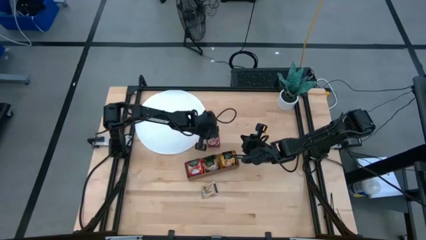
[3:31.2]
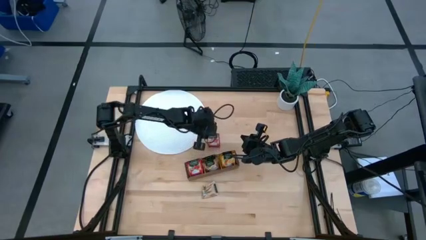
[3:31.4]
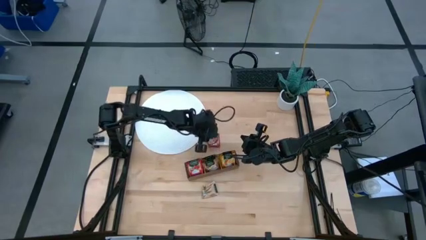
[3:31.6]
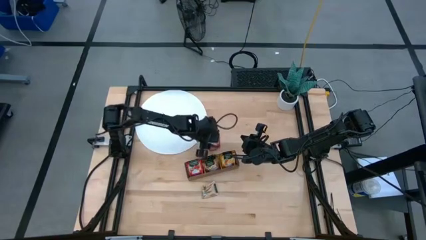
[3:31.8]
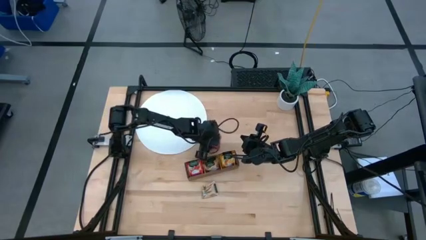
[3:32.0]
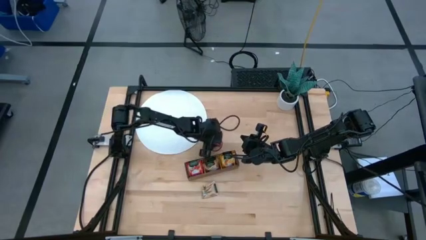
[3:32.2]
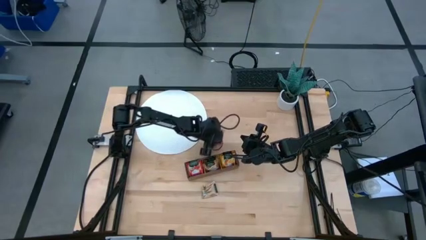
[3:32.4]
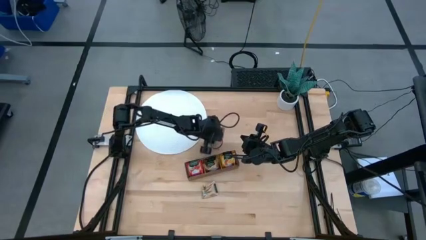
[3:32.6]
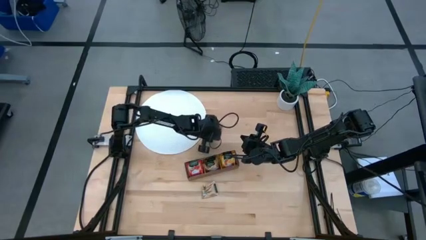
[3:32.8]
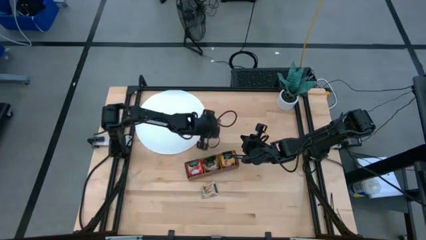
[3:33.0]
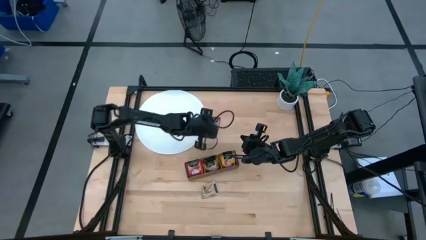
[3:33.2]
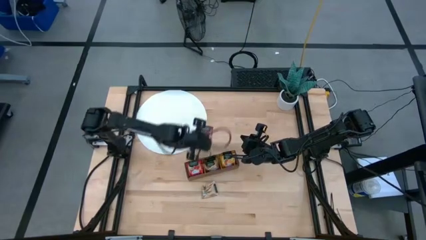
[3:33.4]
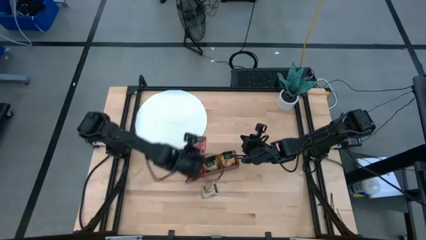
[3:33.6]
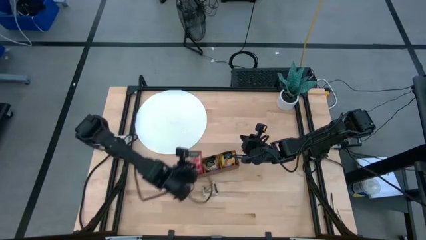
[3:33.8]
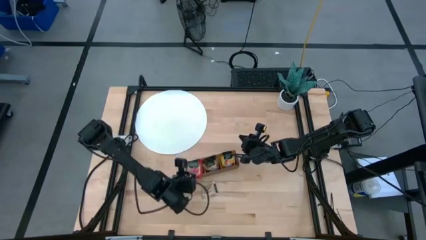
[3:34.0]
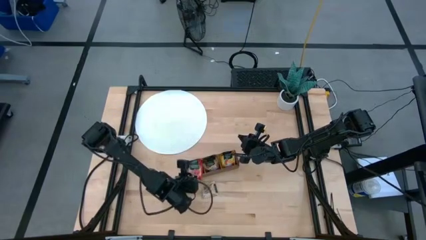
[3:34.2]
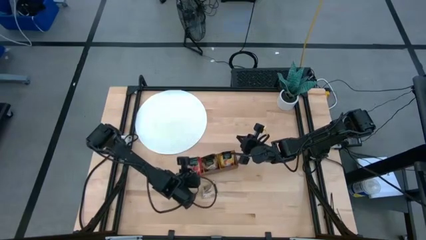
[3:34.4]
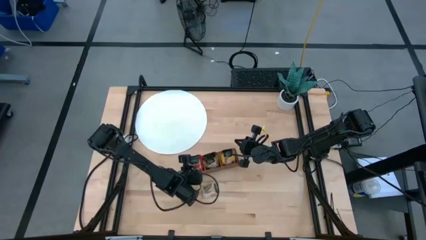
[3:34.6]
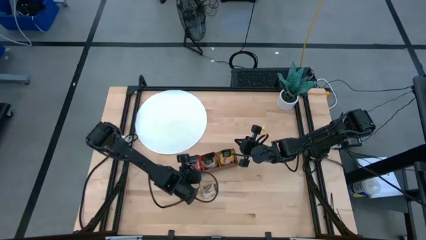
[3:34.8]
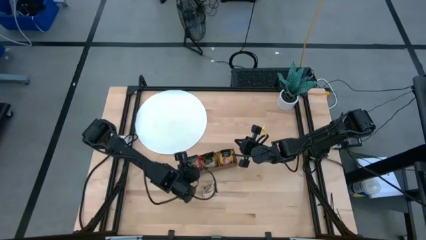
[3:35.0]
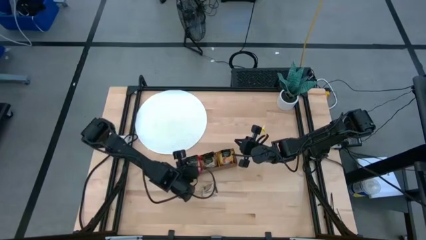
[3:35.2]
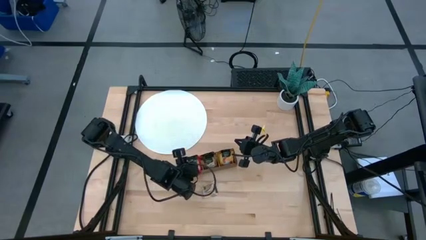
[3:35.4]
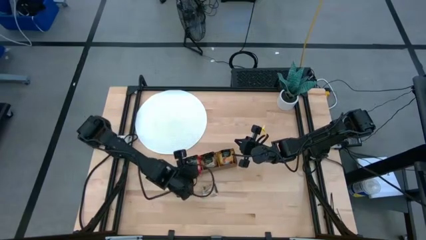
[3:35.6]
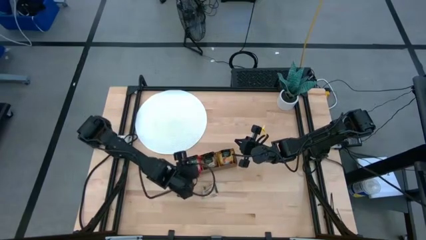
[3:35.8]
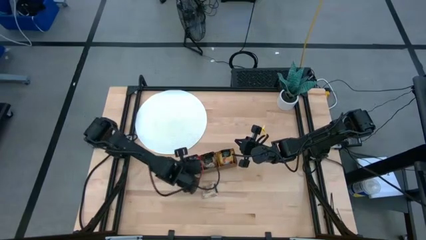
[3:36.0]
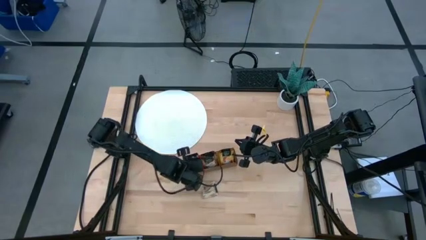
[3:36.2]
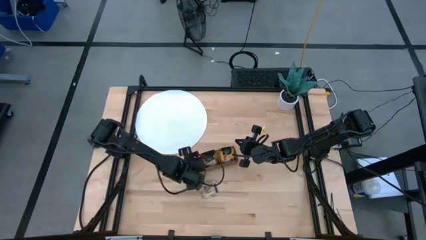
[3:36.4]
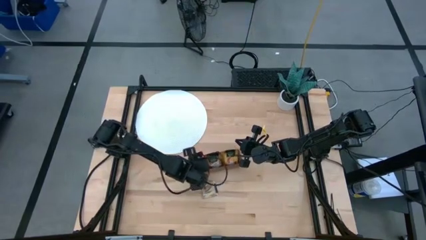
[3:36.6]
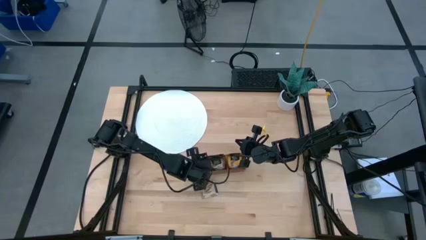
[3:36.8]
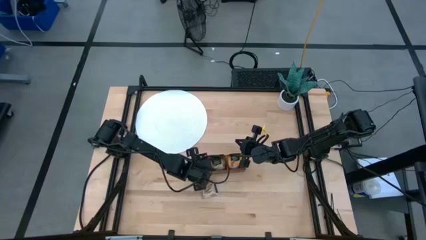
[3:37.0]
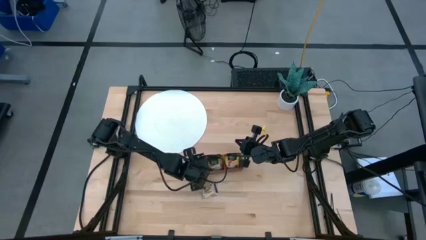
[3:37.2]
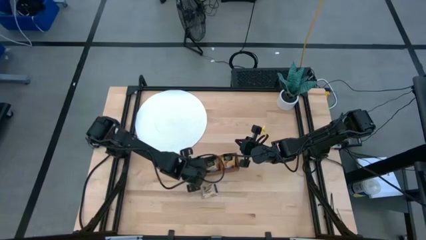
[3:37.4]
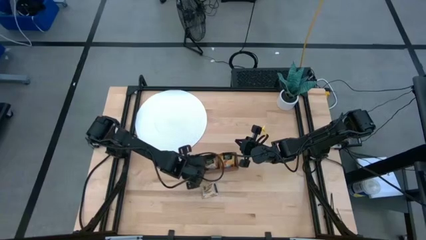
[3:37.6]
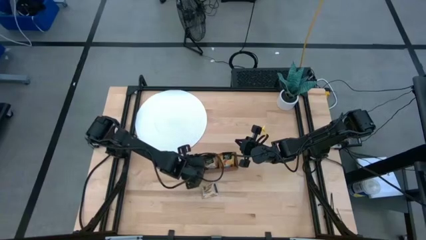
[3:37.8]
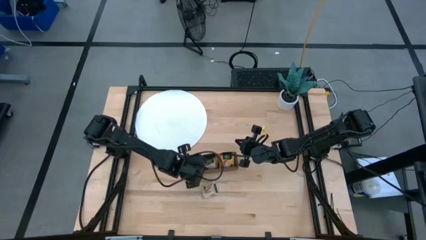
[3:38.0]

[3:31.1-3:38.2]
Task: Pick & Place Tea
Put the red tea bag into the left section of the wooden organizer

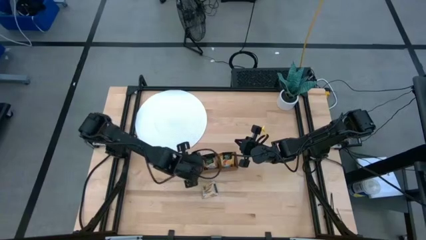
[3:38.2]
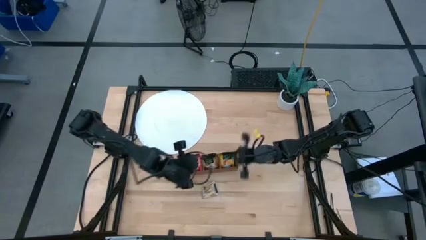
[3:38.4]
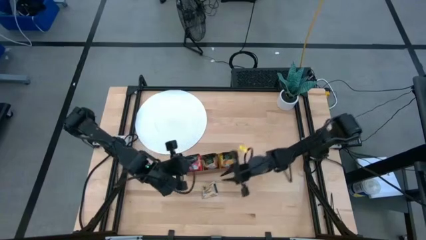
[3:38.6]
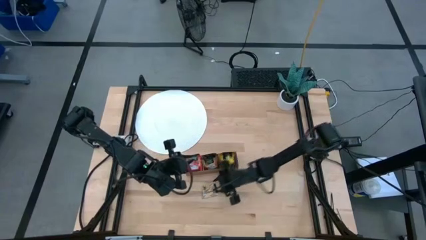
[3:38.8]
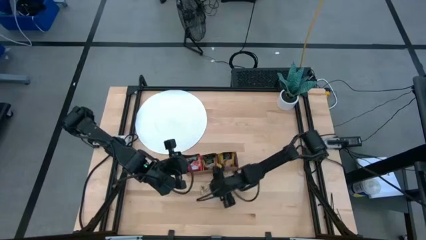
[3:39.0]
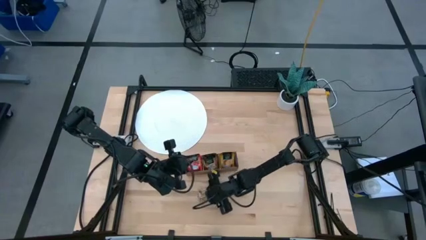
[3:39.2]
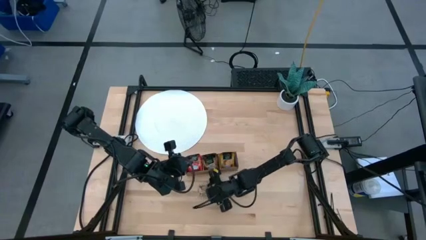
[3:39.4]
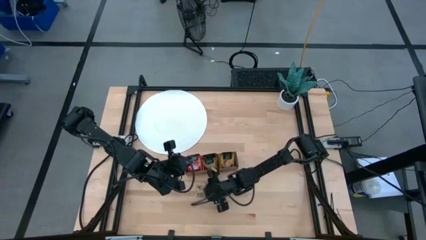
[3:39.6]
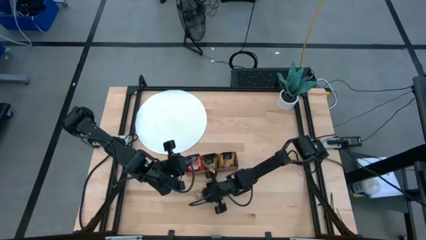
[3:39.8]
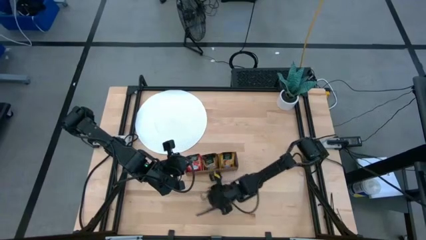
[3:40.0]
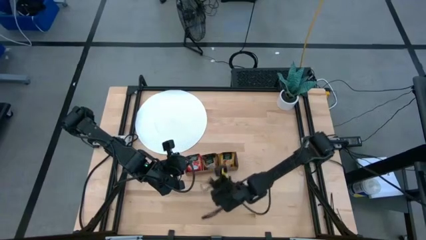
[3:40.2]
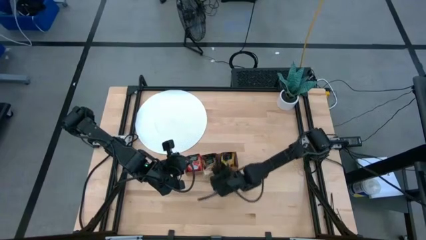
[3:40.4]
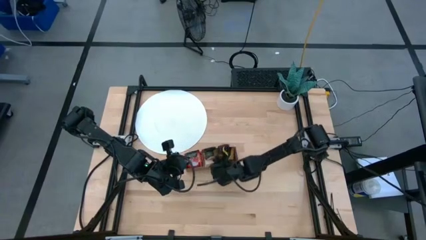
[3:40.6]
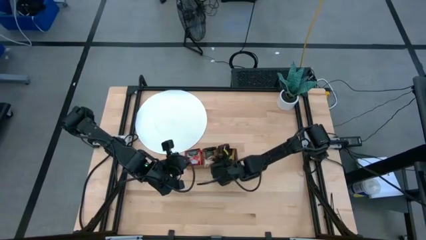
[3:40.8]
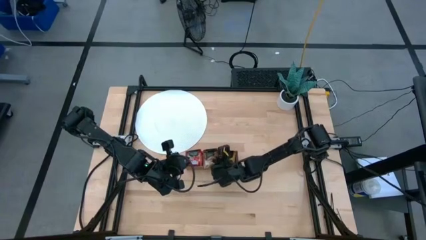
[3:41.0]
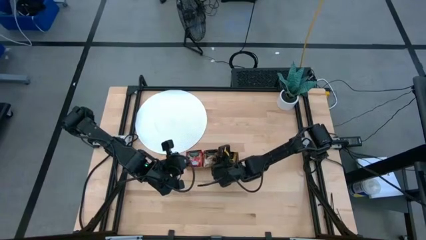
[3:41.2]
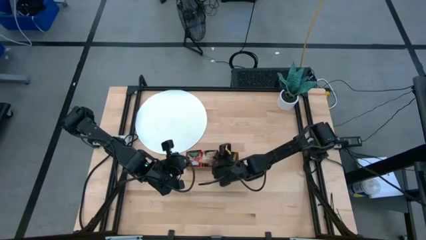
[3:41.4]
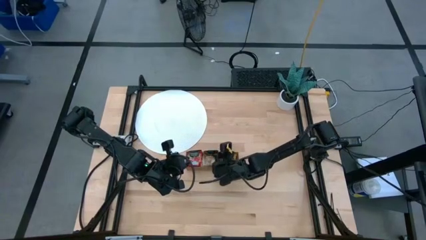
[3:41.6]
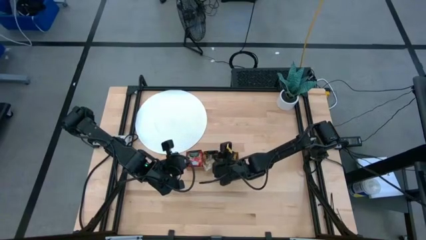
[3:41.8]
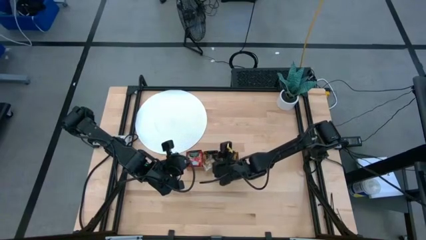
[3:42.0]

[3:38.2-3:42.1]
Put the brown tea bag into the middle section of the wooden organizer

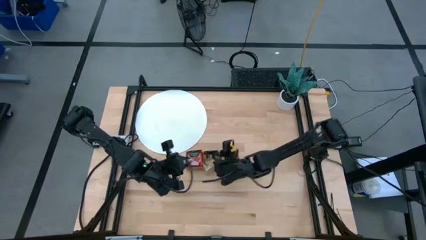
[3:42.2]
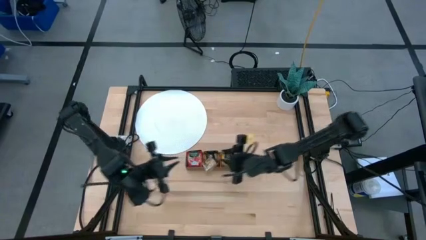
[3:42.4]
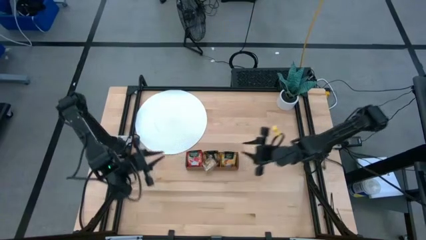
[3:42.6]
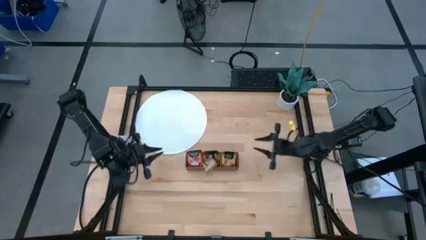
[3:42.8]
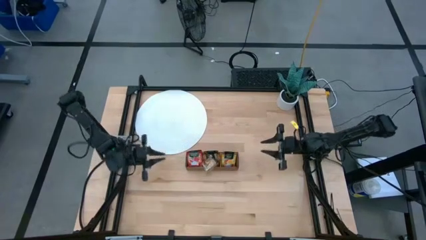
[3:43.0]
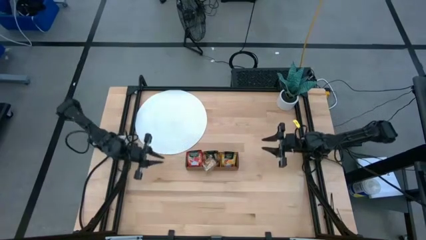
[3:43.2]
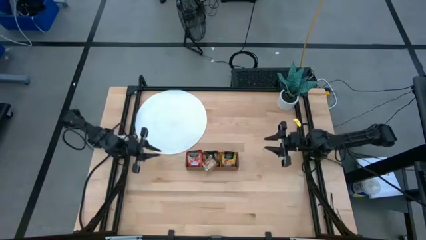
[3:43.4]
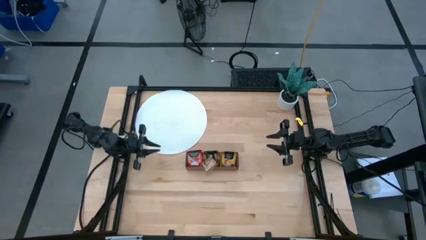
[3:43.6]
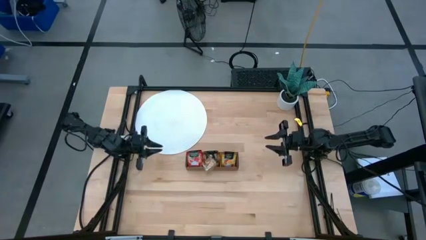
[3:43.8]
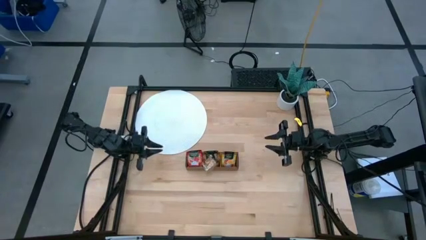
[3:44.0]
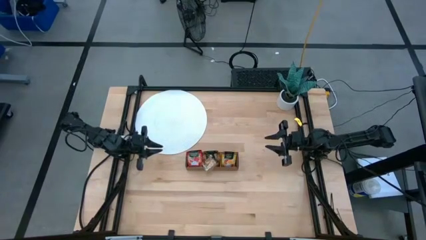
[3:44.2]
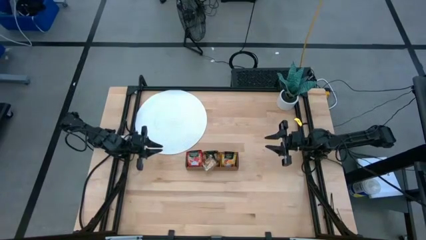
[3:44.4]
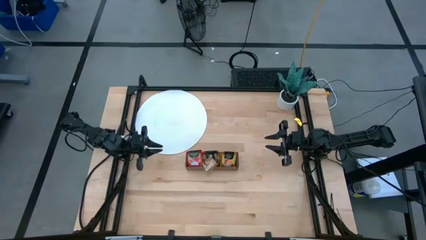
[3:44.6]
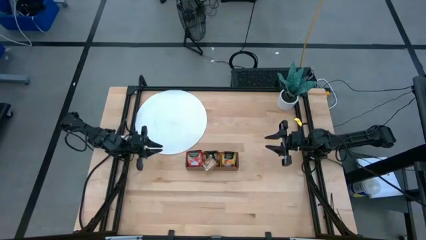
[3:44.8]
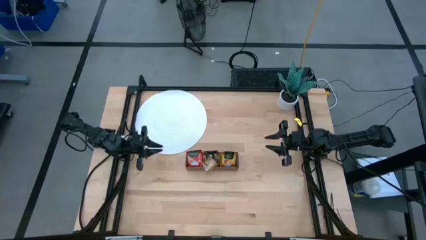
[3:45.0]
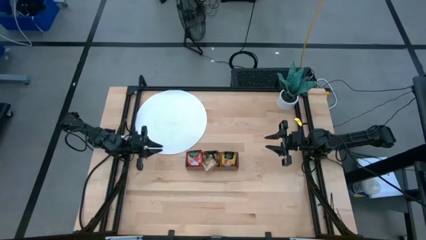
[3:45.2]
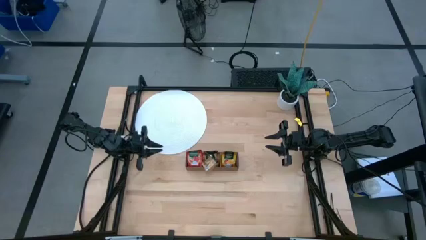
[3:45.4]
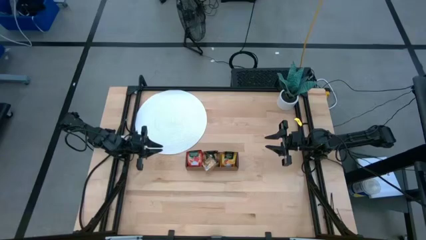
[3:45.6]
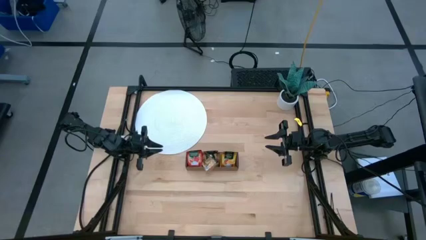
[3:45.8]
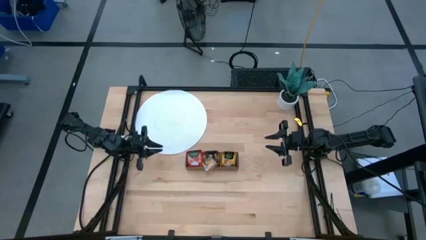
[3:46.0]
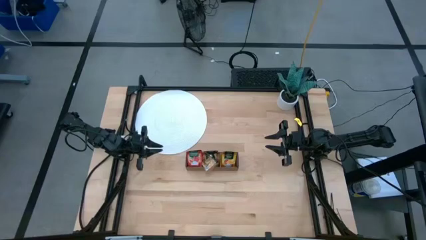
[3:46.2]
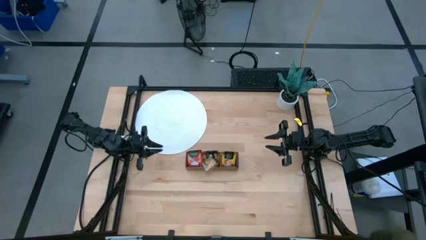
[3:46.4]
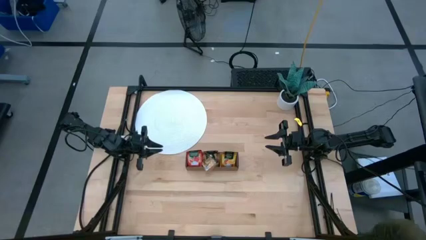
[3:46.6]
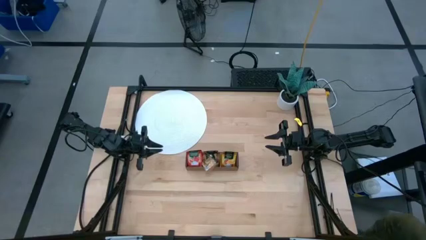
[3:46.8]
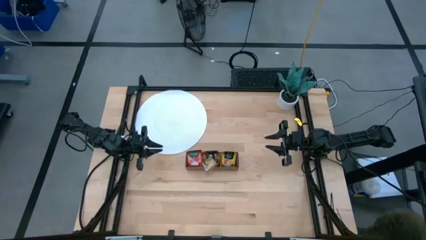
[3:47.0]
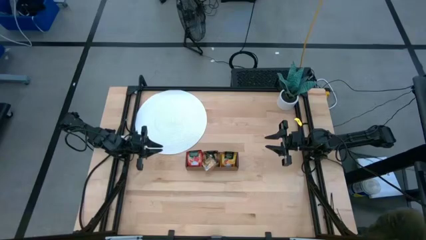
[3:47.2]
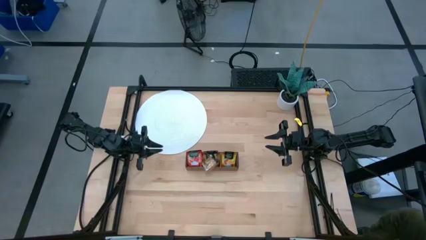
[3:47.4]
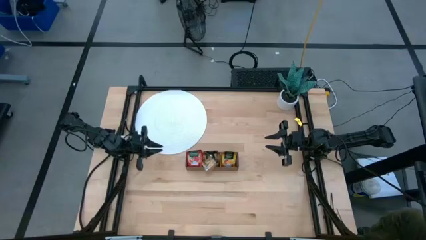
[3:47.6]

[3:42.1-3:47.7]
Return to Home Position
